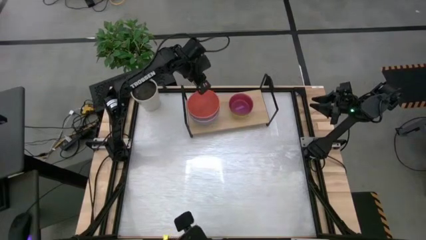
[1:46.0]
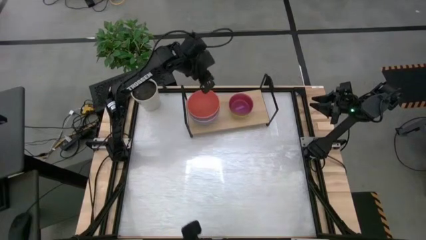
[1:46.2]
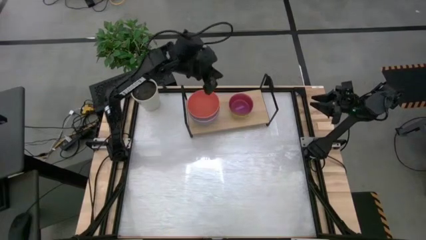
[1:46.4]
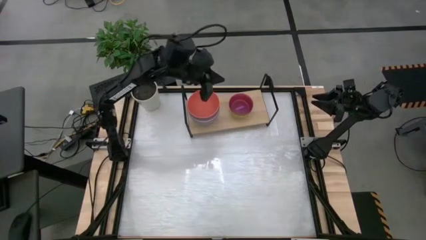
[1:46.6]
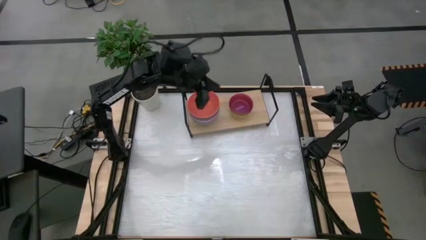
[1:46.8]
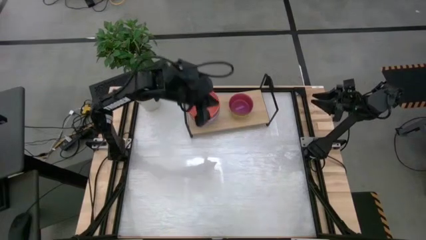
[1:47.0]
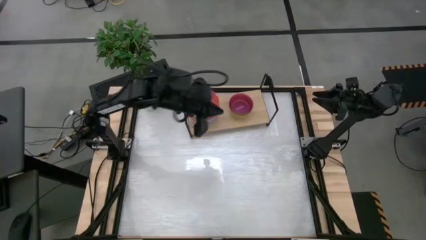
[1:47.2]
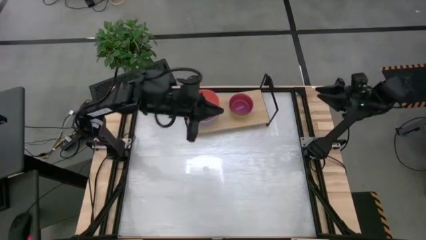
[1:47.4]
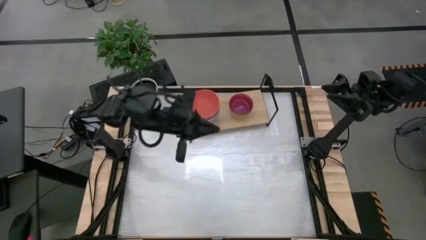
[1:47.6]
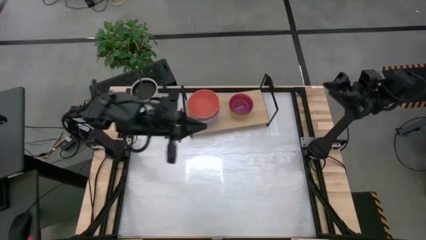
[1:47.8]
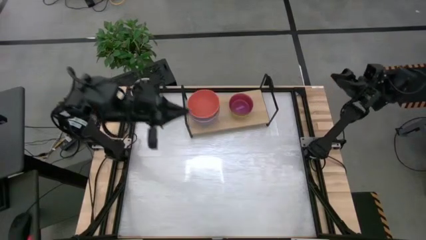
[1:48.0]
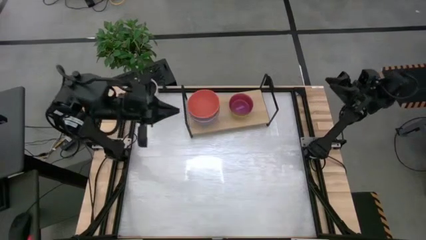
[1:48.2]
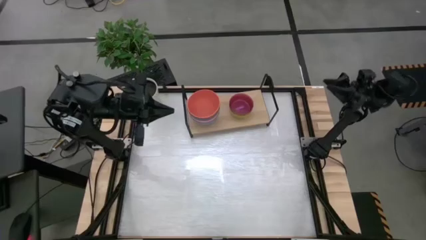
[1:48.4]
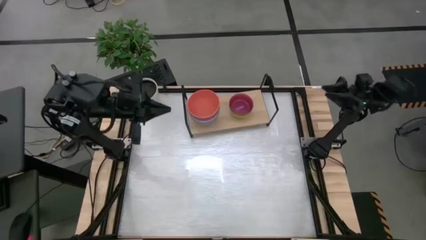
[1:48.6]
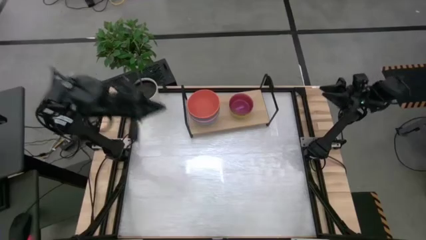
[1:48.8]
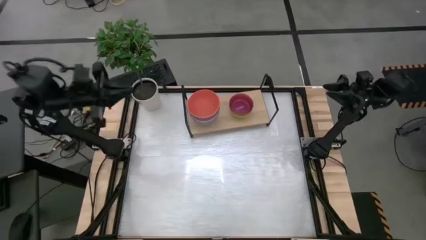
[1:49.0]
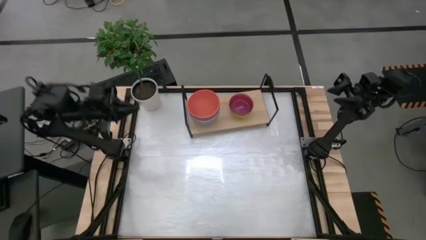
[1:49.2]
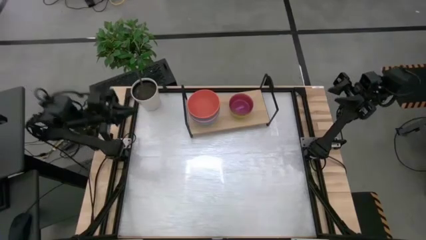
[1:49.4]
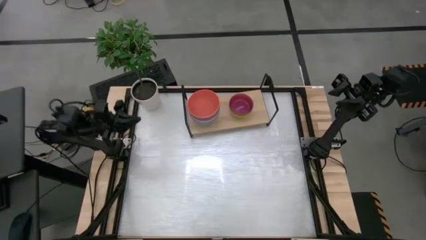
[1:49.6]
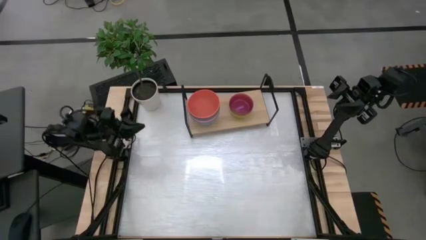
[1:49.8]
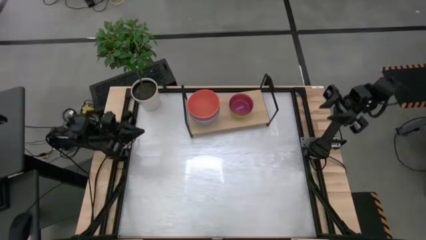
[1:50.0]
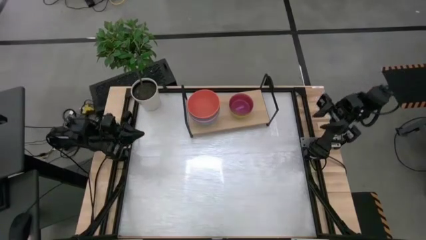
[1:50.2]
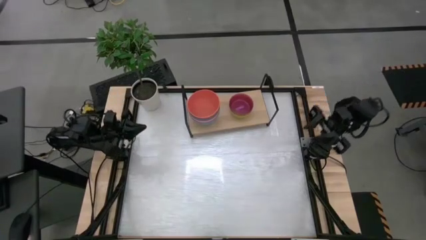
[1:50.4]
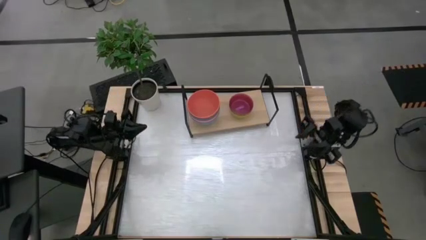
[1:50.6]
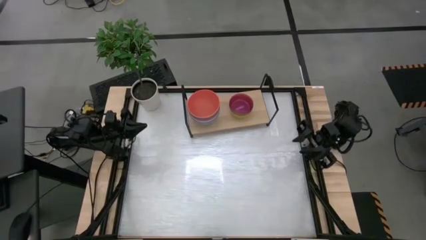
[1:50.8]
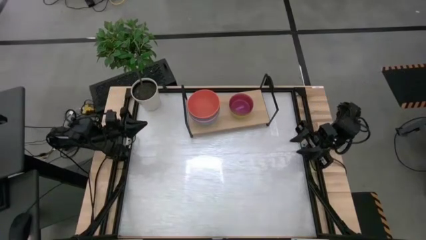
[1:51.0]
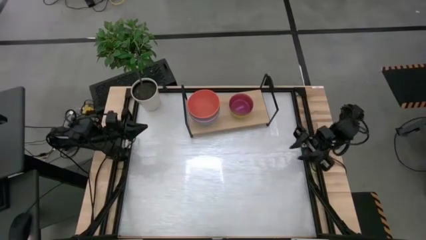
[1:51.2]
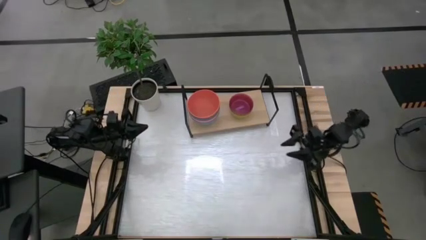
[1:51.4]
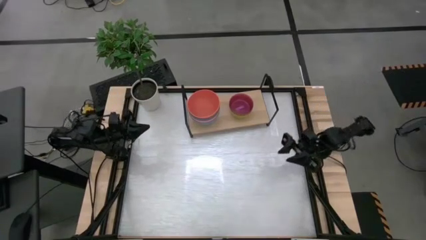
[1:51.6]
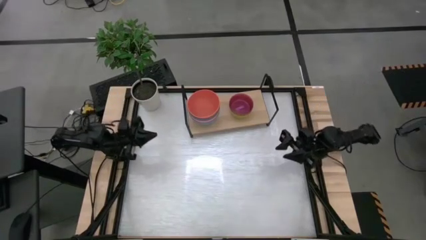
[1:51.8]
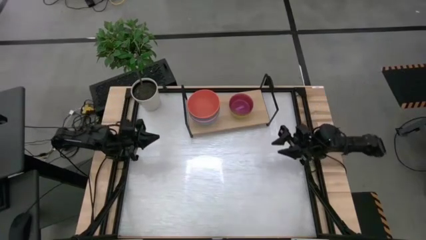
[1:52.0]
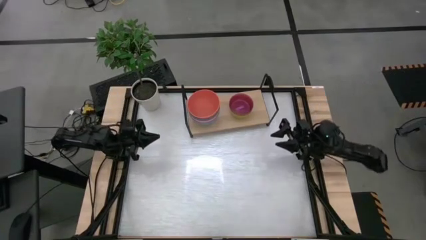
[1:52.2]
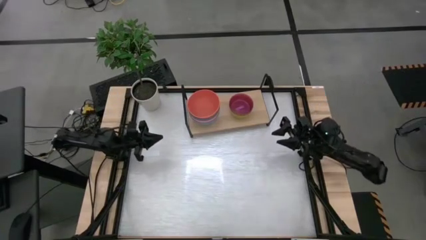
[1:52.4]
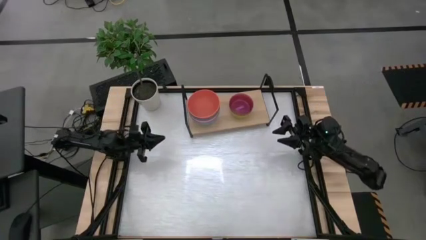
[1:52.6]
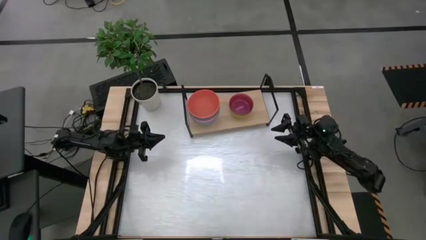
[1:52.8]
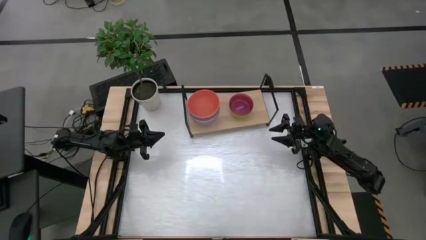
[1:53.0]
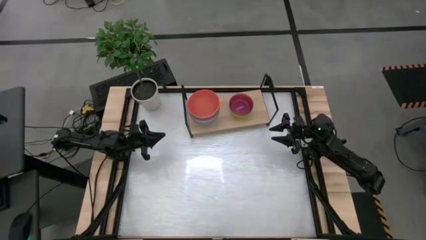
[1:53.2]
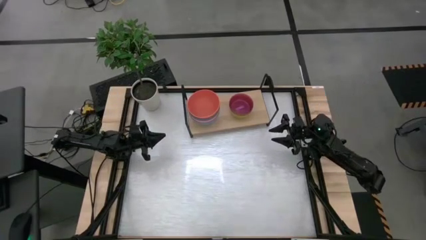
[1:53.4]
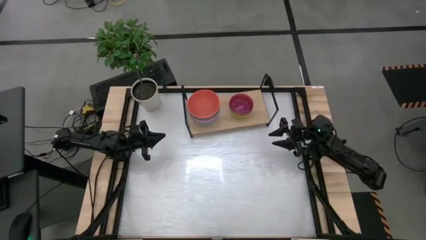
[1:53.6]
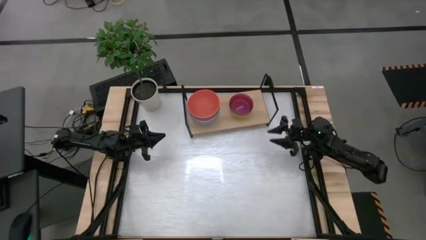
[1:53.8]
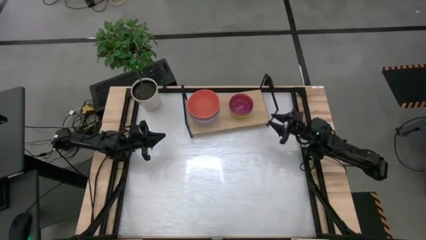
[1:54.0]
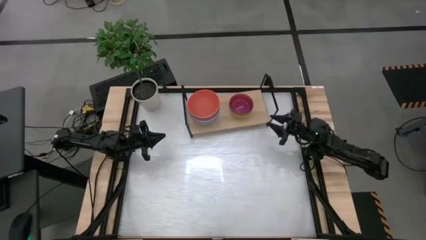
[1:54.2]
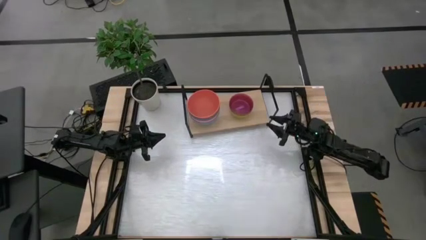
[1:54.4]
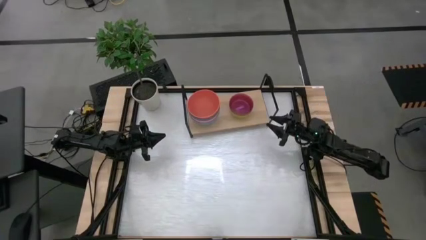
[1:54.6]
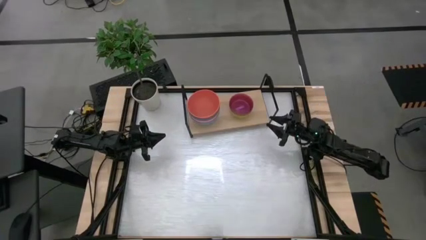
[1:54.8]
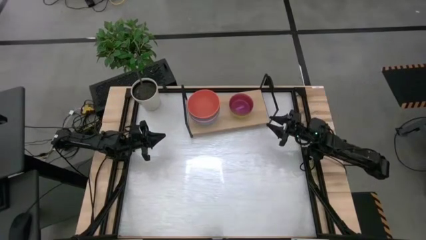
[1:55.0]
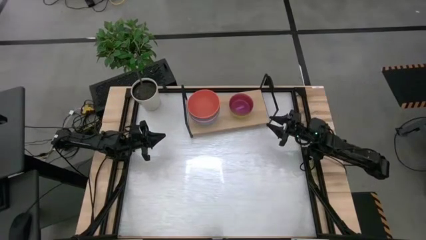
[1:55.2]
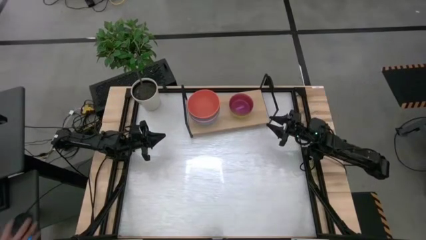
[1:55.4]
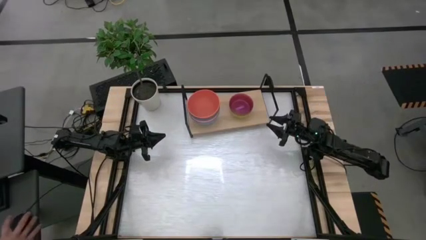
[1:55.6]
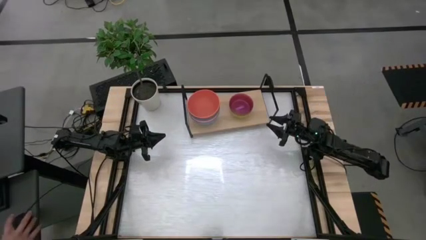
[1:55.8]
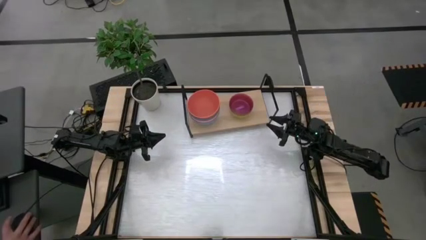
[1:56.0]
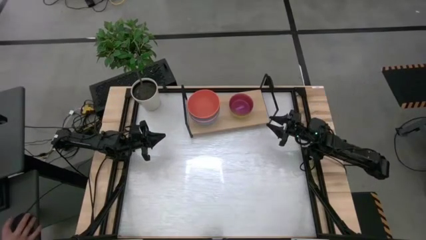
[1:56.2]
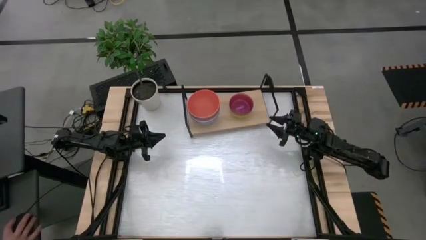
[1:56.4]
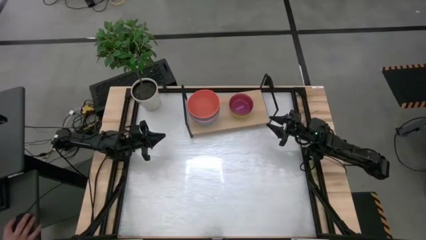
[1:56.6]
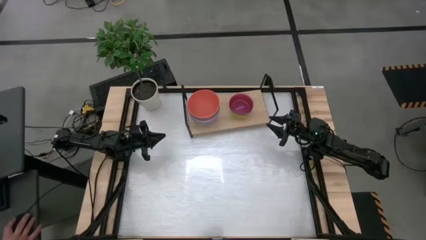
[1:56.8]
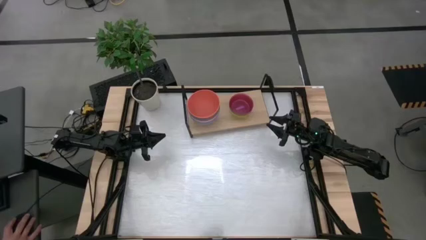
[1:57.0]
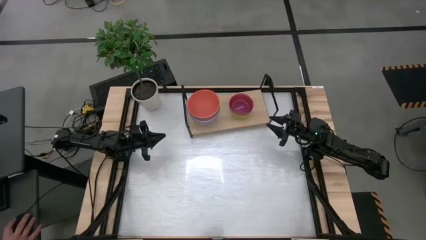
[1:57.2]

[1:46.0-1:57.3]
Task: Place and stack bowls onto a shelf
Return to Home Position
